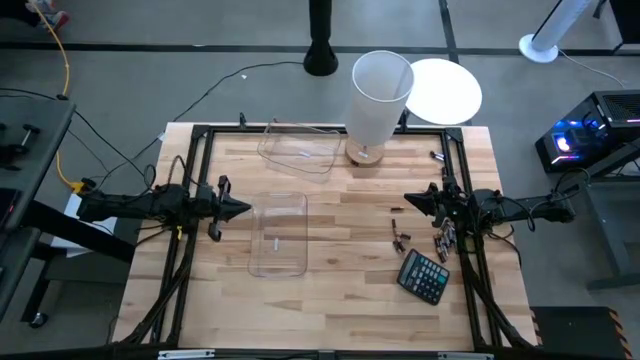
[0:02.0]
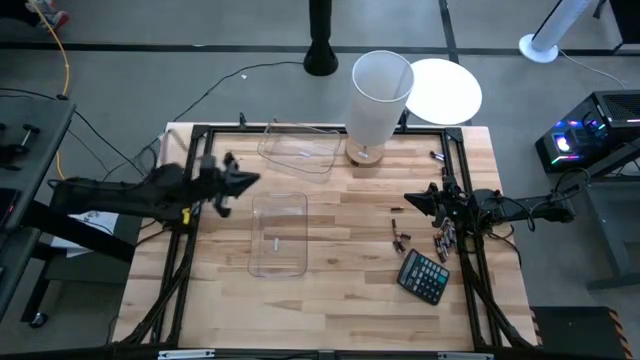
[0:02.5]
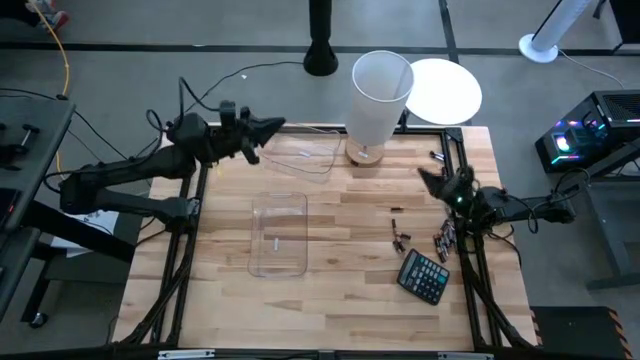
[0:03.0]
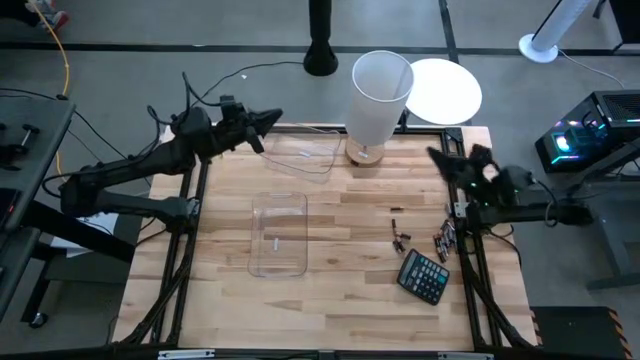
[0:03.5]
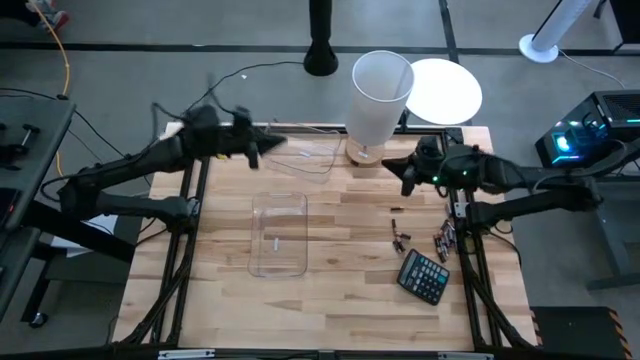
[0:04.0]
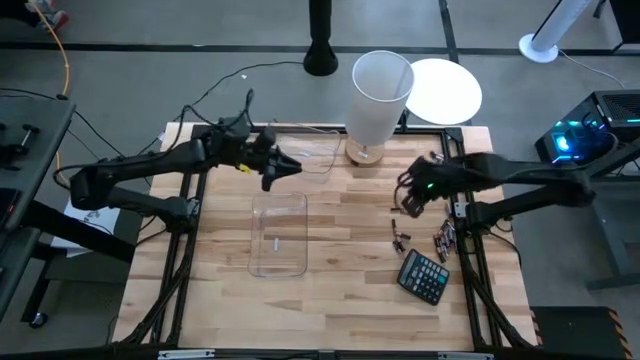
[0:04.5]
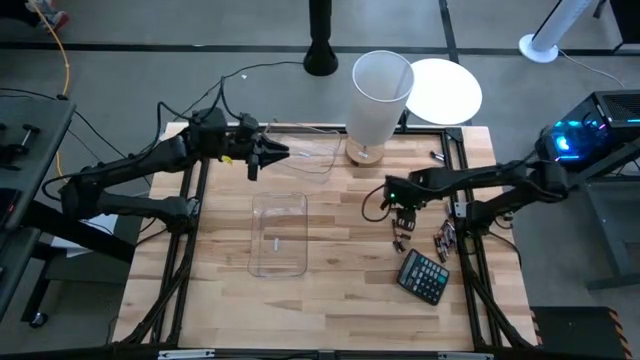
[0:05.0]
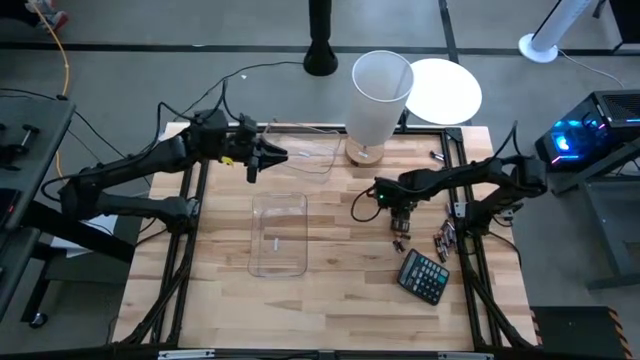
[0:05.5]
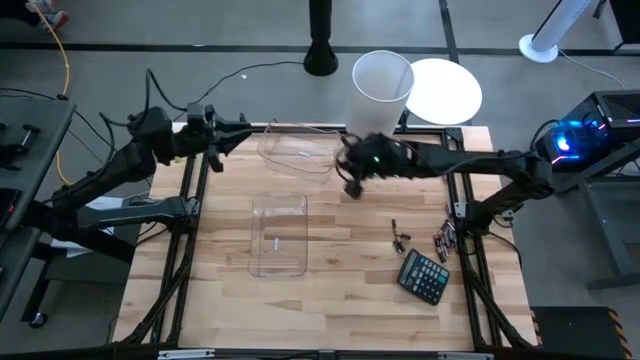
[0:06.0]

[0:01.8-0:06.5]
Task: Sort batteries
Put the black battery into the top transparent bin

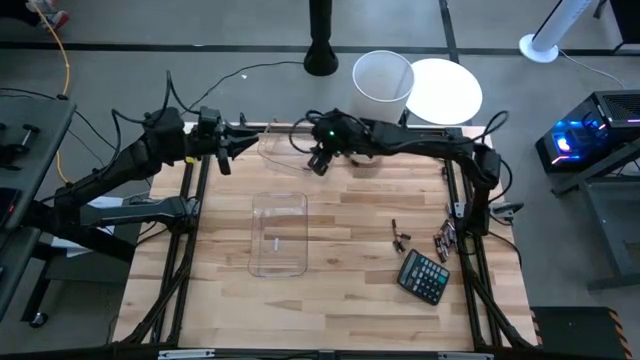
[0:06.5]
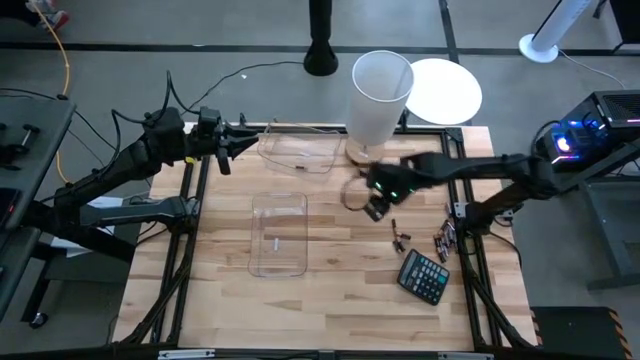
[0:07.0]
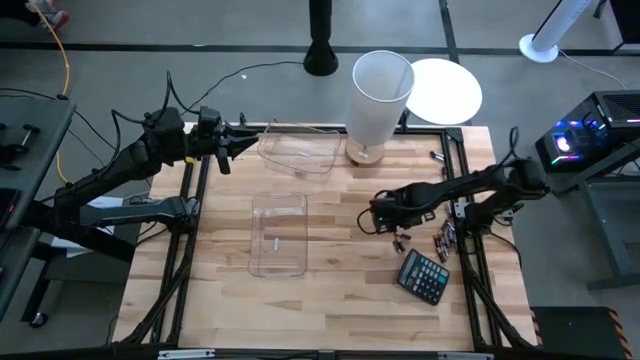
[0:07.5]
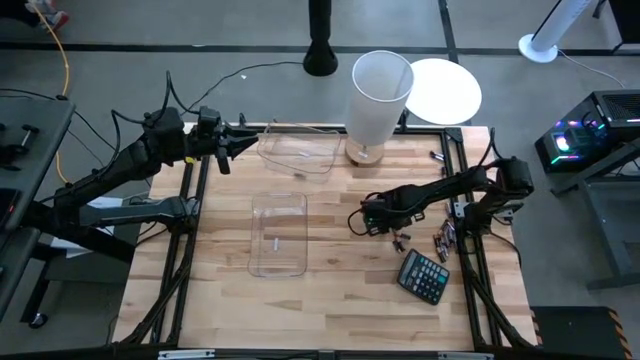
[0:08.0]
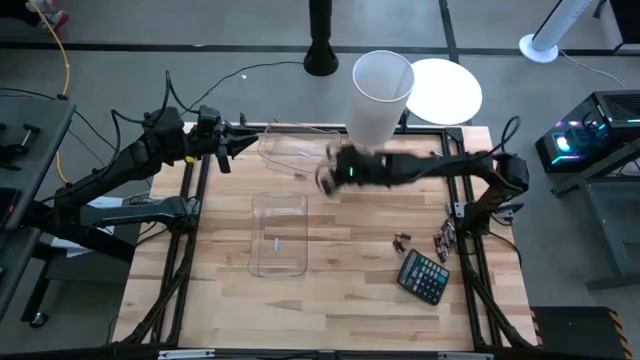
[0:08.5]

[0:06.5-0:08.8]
Put the black battery into the top transparent bin

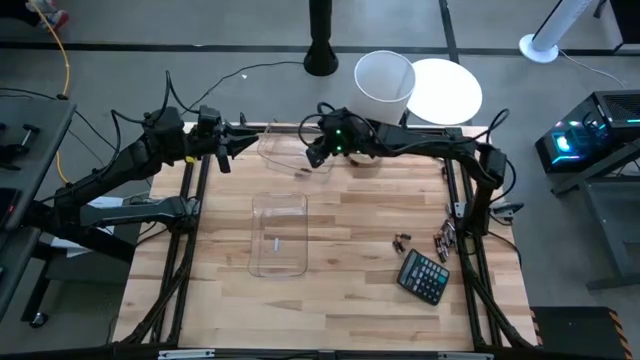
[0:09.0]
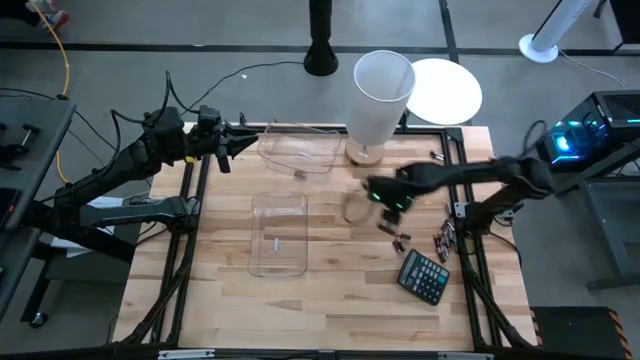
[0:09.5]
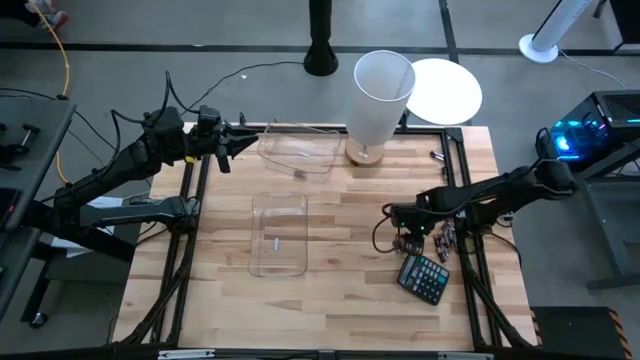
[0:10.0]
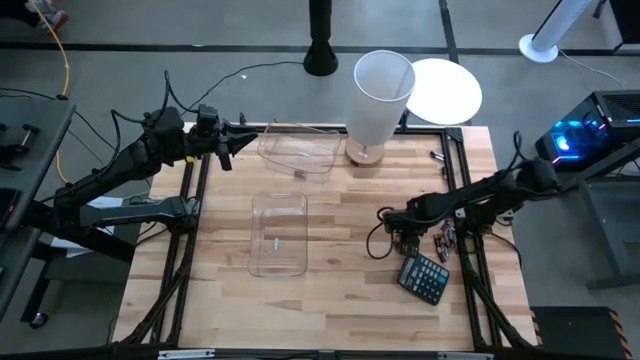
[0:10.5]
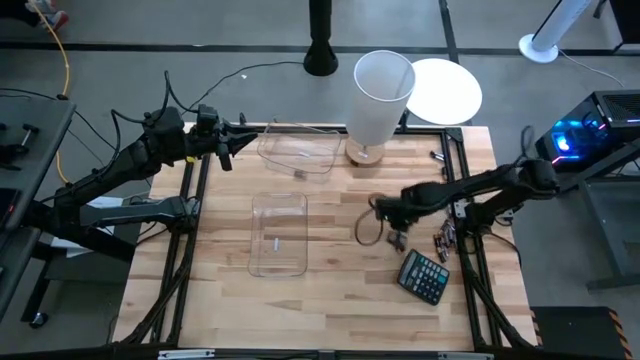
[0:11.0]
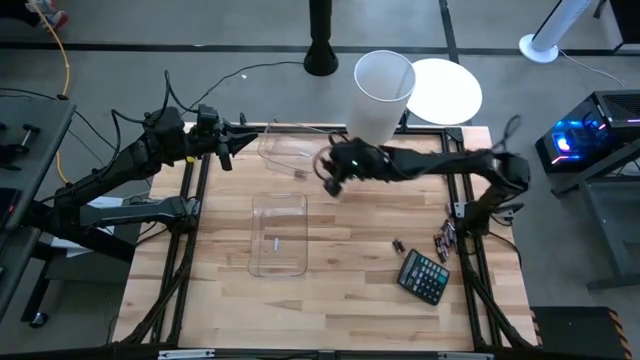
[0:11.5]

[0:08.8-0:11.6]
Put the black battery into the top transparent bin

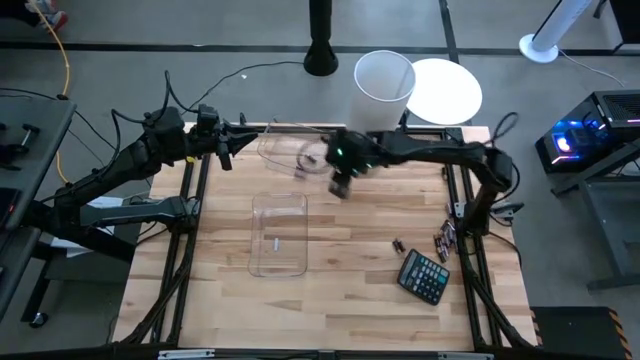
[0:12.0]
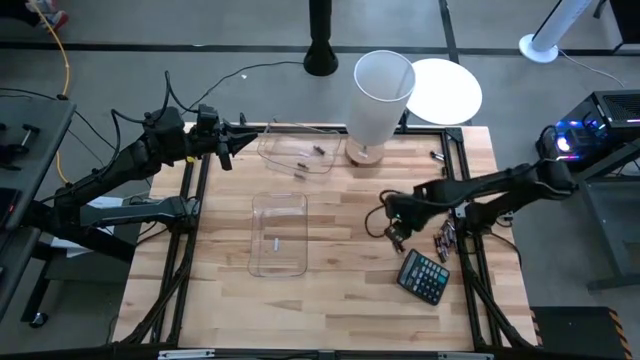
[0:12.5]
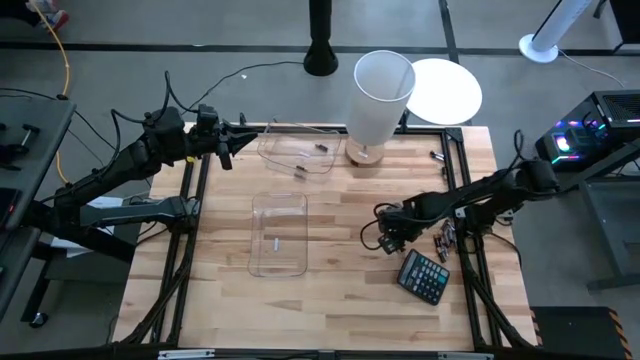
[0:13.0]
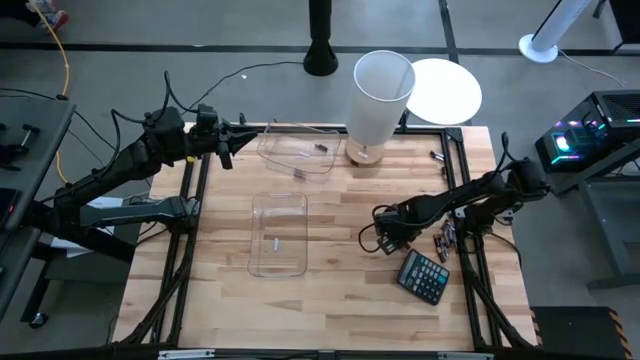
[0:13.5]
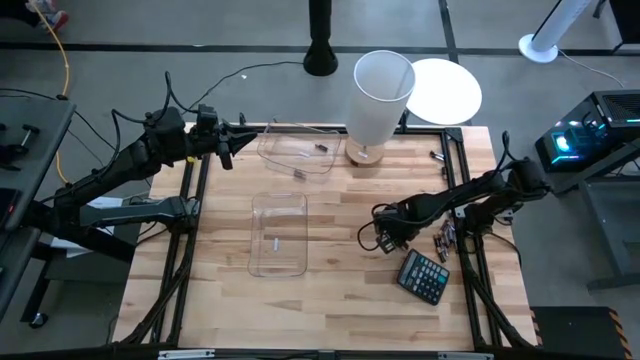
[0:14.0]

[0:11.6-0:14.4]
Put the black battery into the top transparent bin

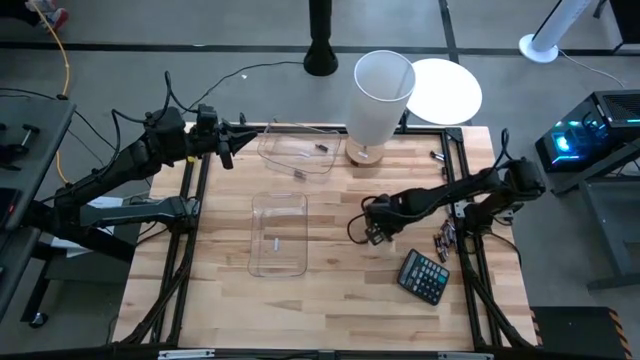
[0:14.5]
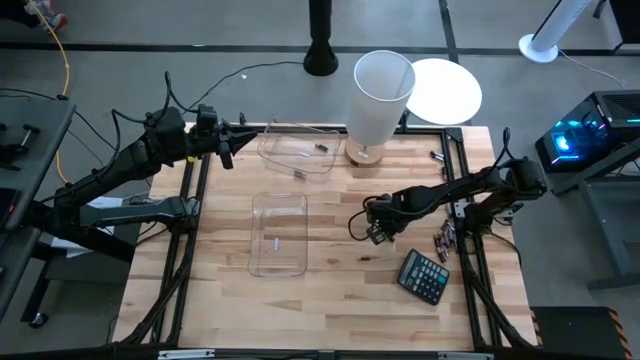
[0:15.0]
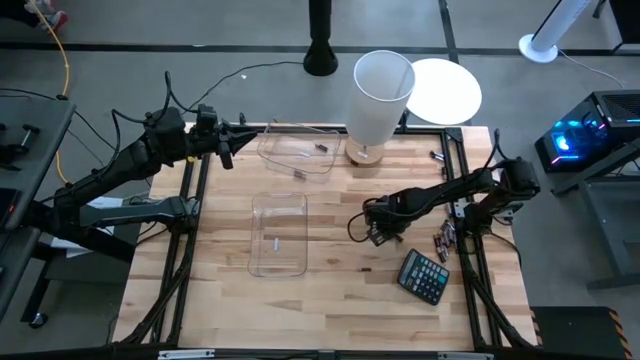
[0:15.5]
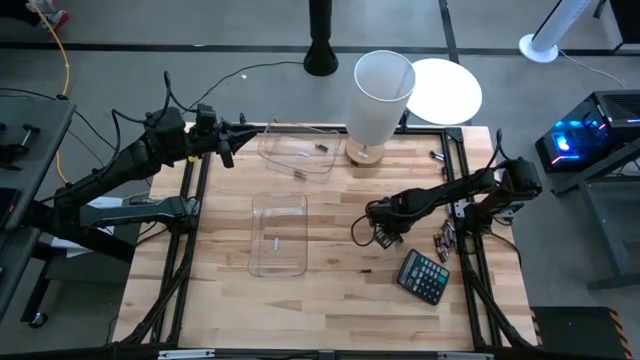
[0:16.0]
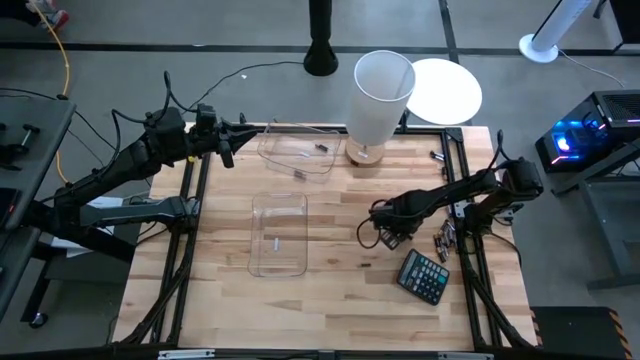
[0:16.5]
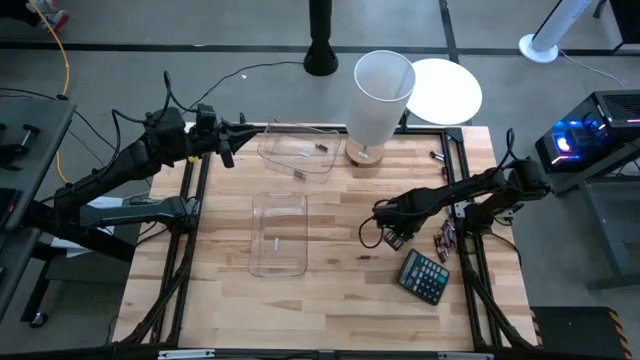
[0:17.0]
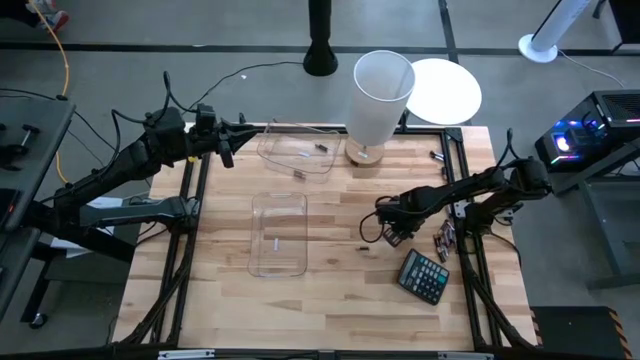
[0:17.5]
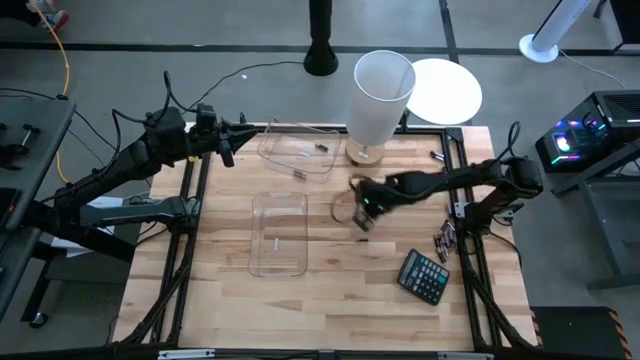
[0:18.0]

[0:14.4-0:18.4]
Put the black battery into the top transparent bin

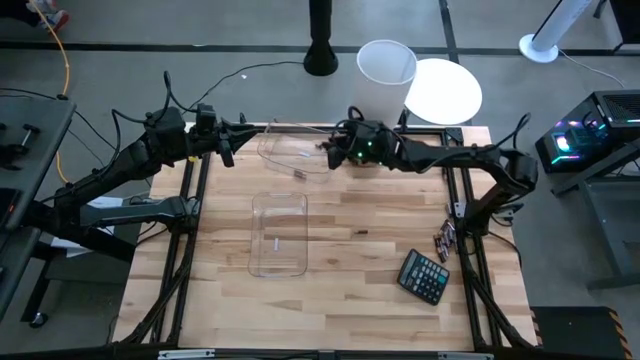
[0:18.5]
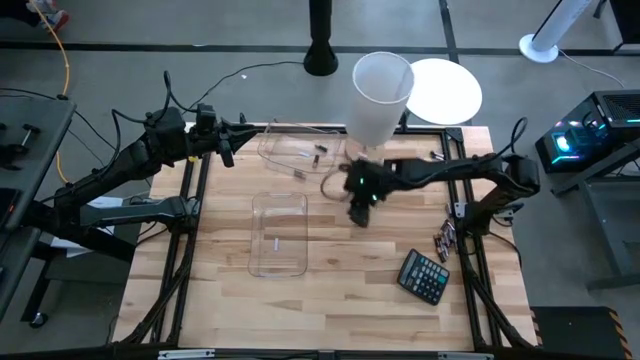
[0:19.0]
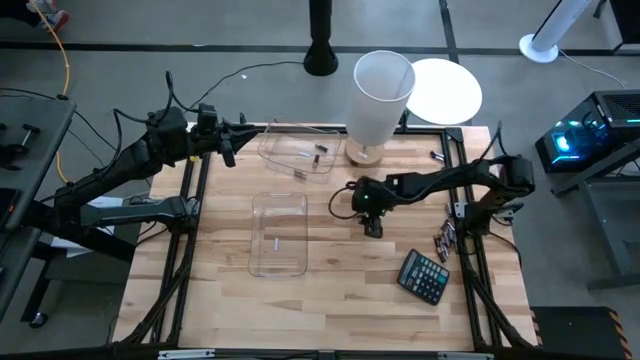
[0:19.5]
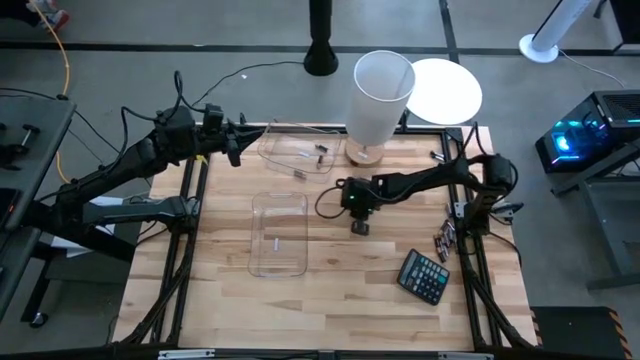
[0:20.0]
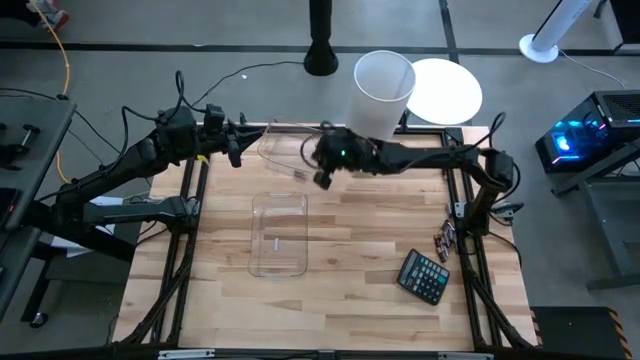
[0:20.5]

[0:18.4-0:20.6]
Put the black battery into the top transparent bin

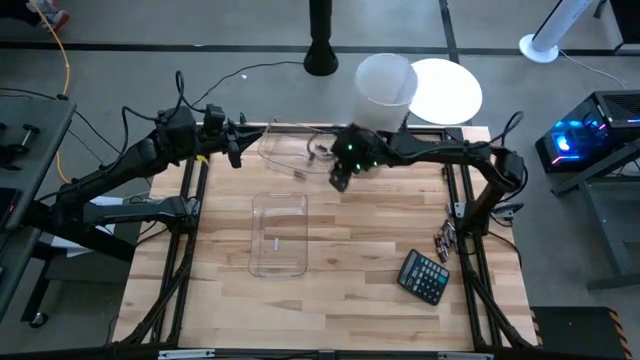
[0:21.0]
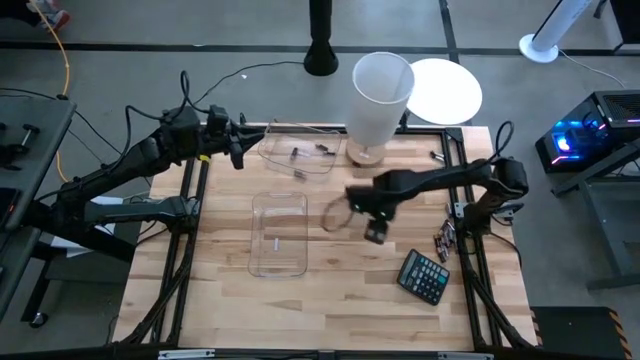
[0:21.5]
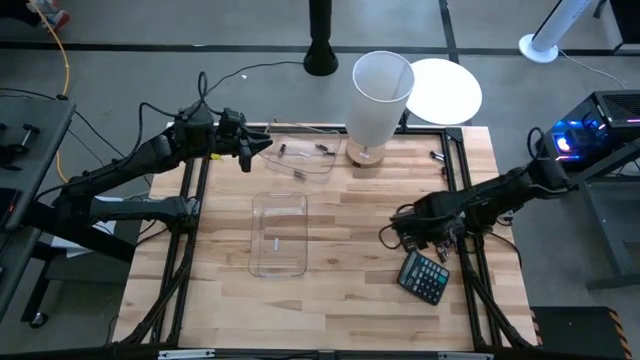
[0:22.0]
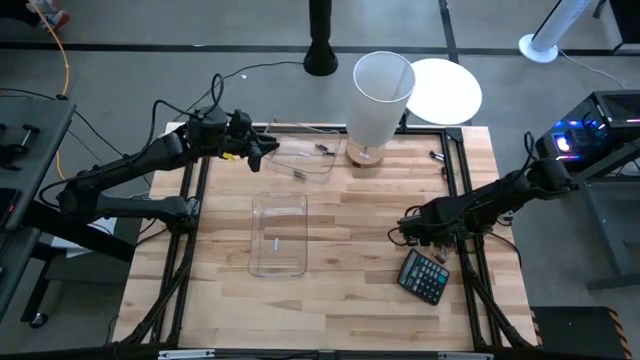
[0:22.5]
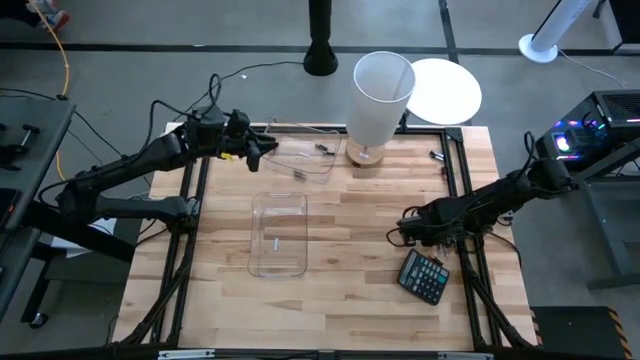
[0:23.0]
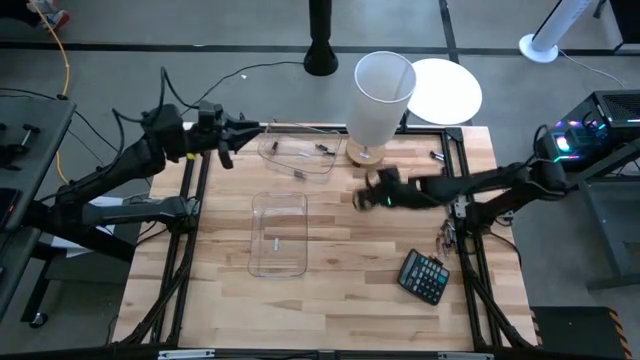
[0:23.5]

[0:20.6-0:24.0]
Put the black battery into the top transparent bin
